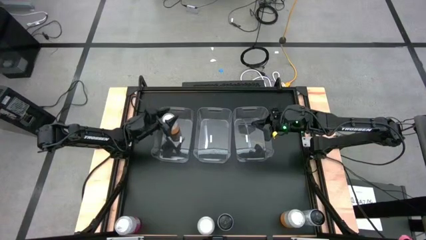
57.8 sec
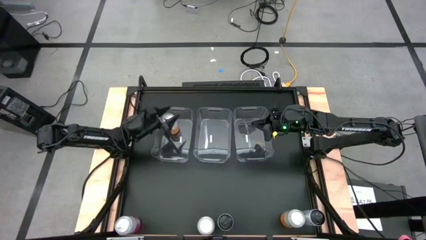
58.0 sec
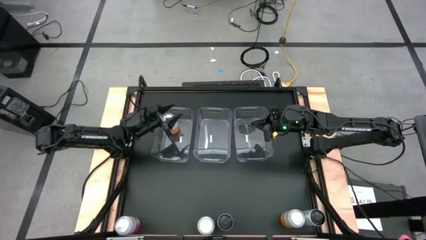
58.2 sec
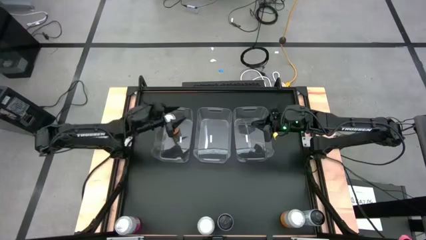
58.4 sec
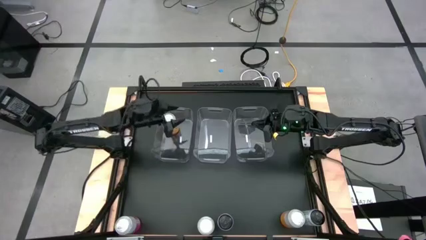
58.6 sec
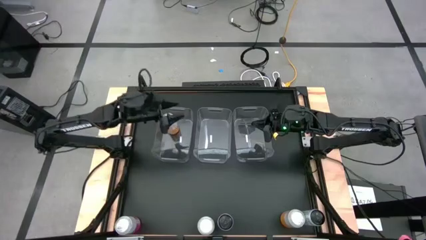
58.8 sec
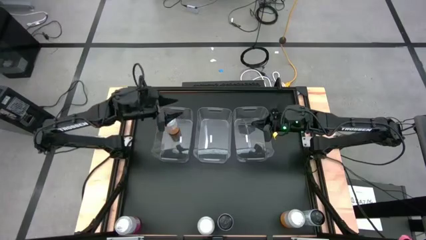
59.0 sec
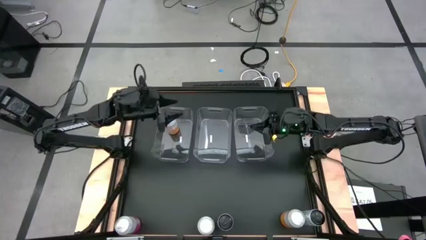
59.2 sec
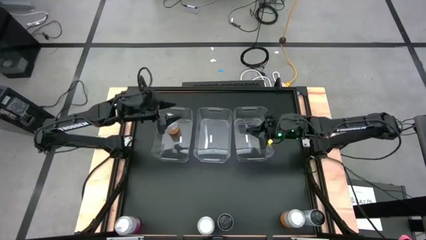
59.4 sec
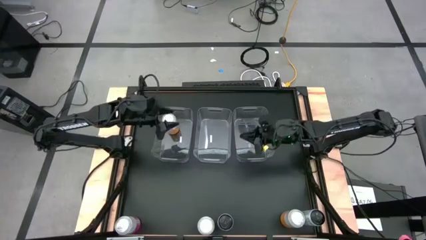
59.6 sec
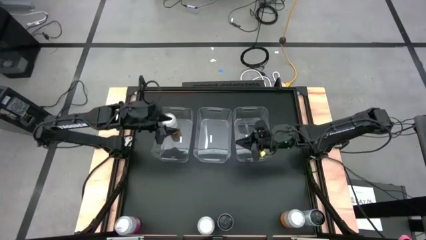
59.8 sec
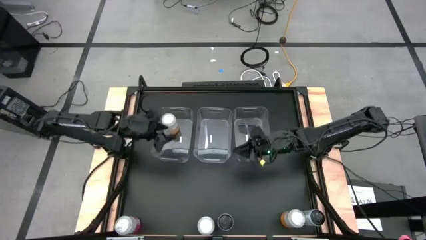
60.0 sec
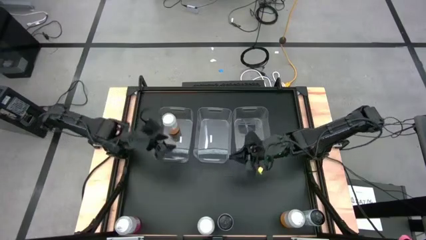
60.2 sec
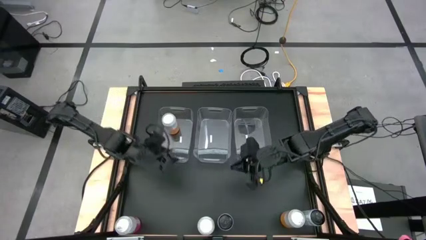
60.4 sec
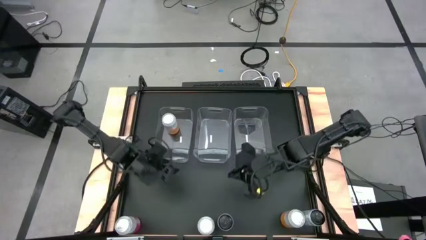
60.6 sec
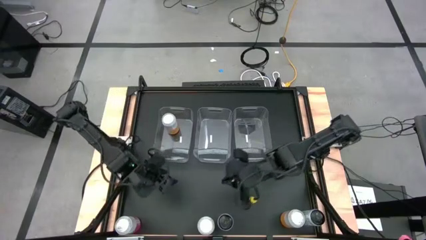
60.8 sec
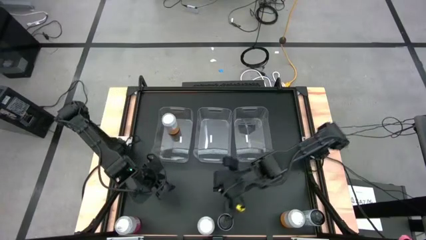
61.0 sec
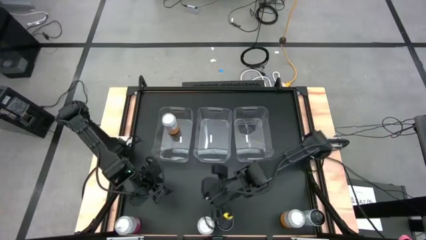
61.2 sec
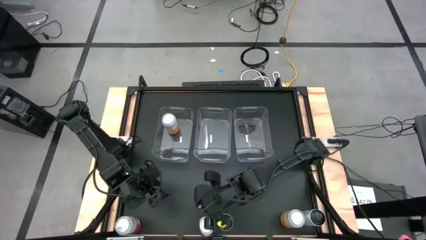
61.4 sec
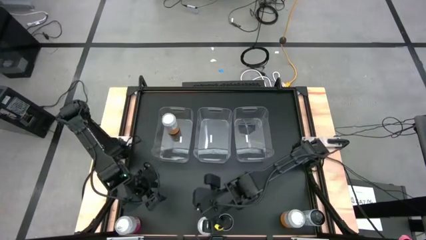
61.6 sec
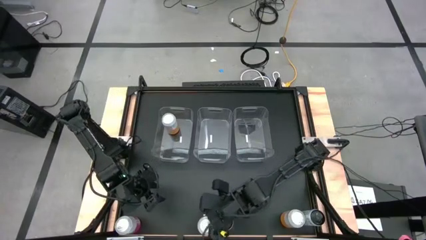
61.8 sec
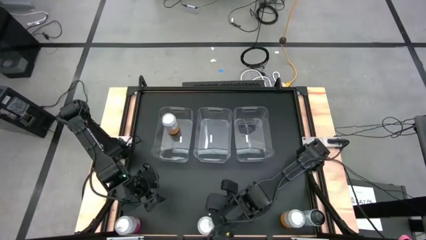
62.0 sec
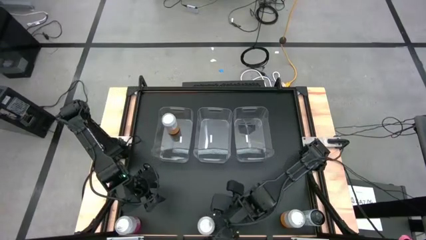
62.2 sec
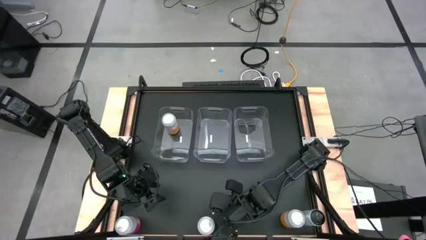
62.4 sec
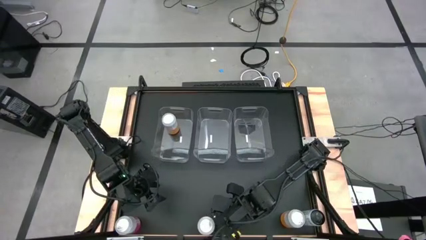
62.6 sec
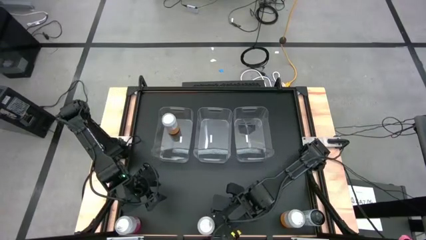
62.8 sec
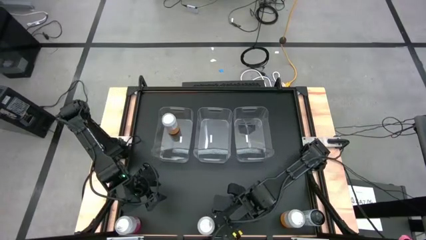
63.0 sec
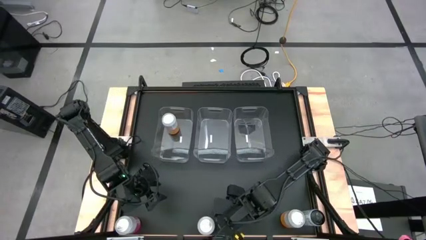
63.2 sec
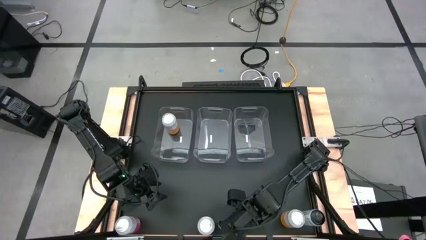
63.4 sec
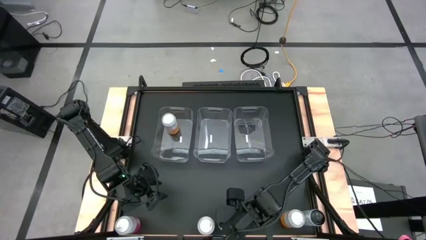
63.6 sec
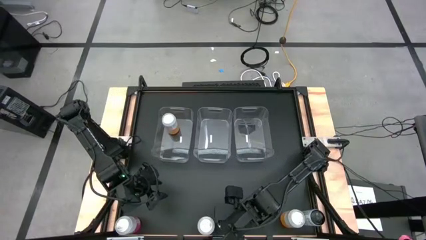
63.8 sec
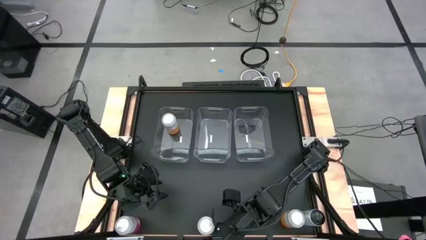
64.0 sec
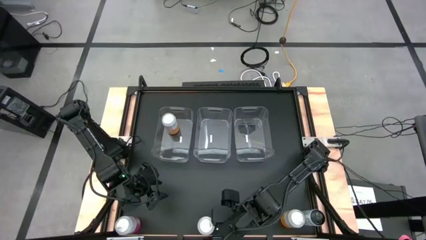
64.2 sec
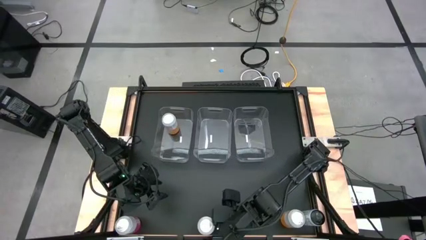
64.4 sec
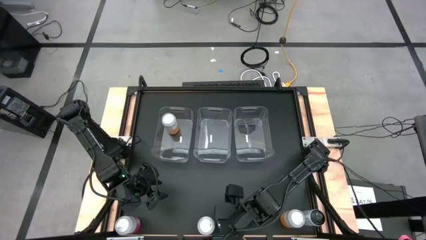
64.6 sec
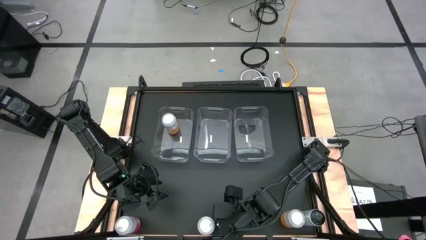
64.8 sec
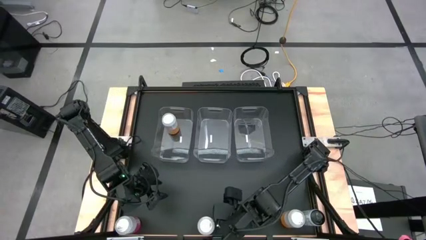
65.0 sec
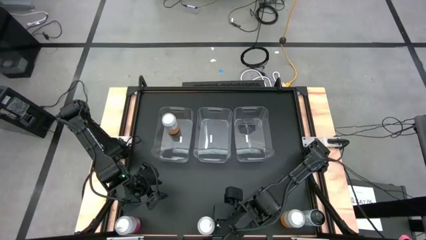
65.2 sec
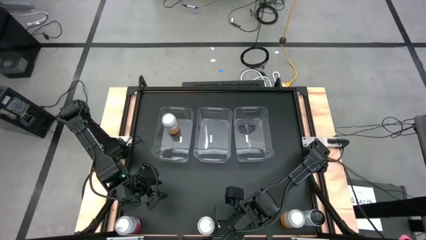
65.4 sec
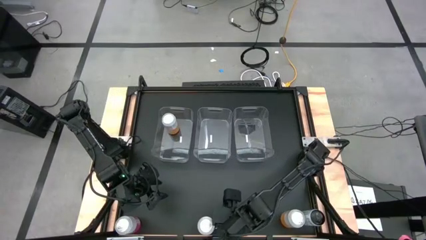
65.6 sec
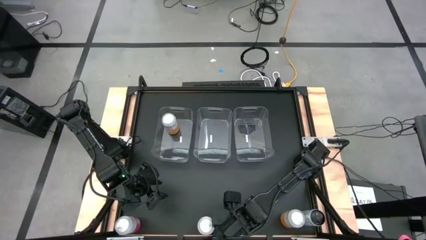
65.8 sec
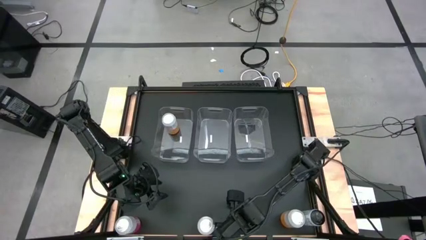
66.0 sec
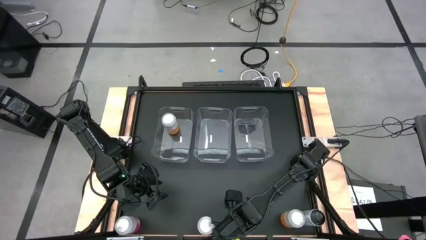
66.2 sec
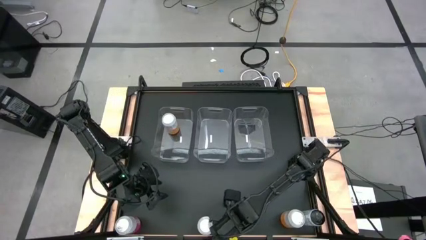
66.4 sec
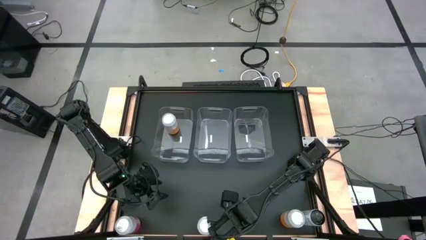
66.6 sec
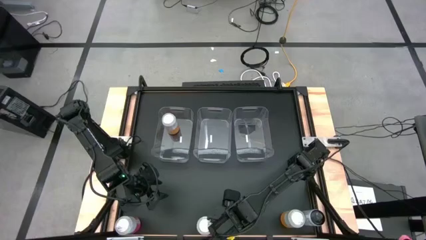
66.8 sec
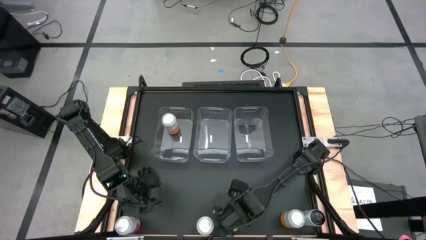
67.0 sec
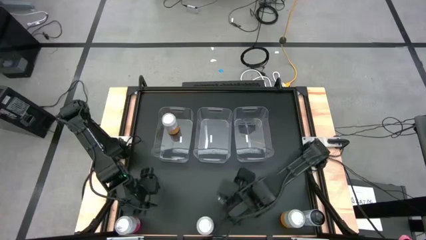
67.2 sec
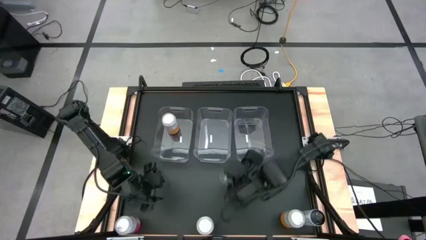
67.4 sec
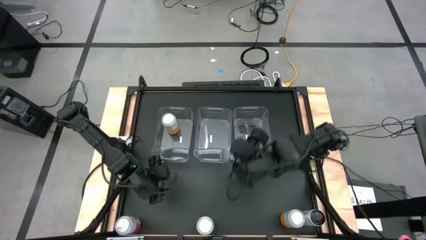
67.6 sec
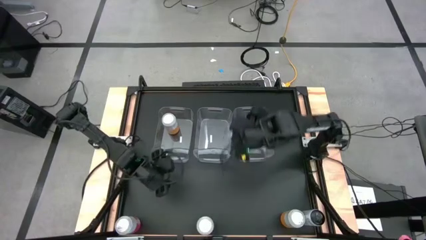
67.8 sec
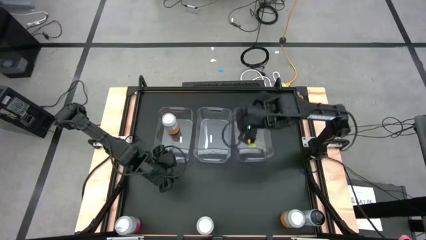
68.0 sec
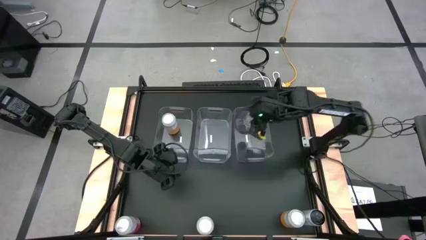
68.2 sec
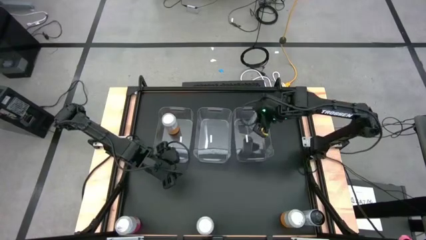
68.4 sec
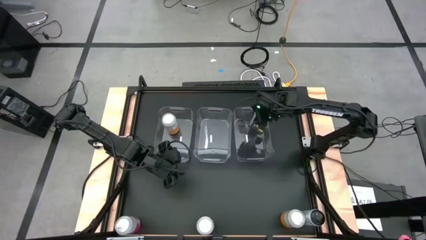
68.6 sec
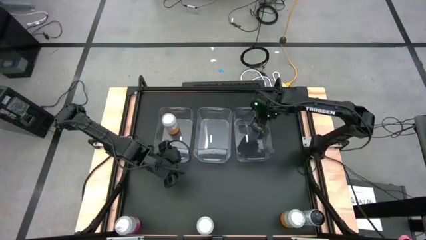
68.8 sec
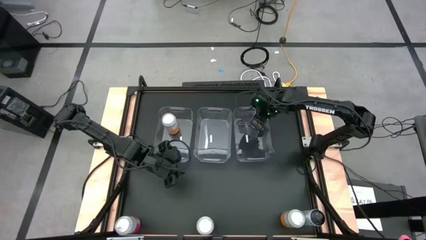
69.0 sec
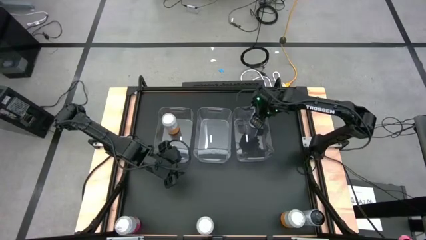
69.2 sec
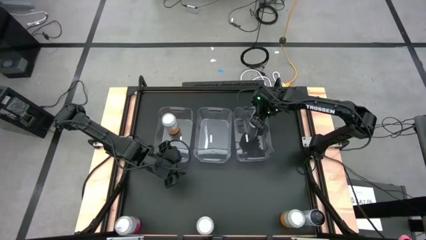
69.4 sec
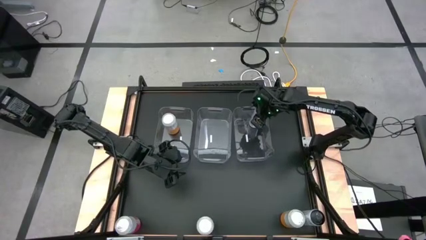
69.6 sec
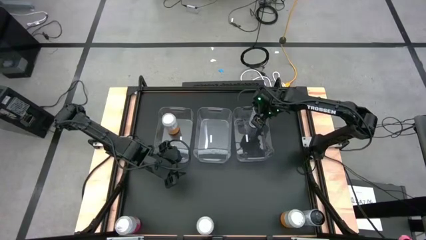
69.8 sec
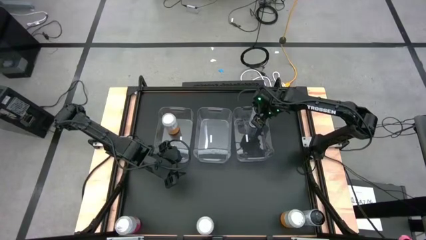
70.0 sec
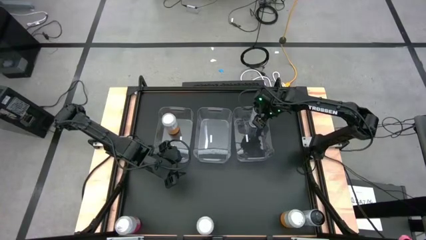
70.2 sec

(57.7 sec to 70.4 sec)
Task: Sort soda cans
Put the left white-blue soda can into the right transparent bin

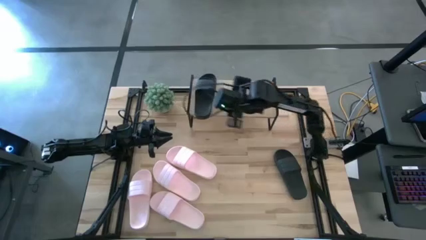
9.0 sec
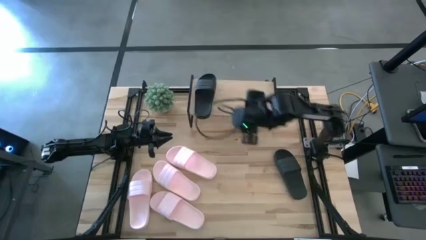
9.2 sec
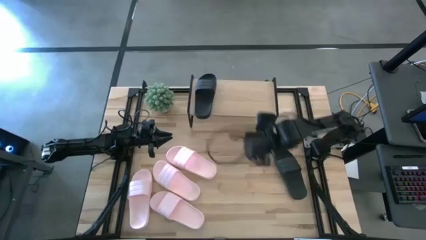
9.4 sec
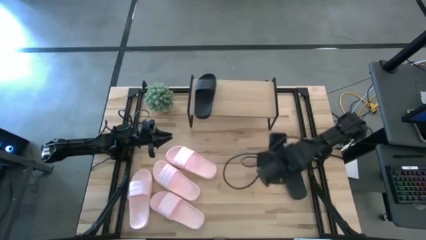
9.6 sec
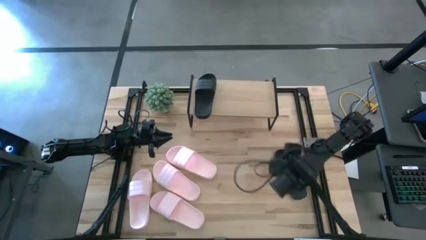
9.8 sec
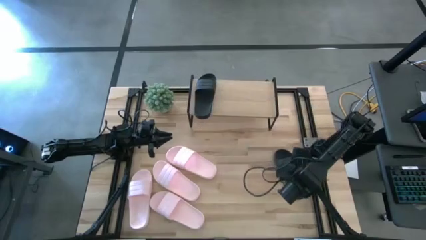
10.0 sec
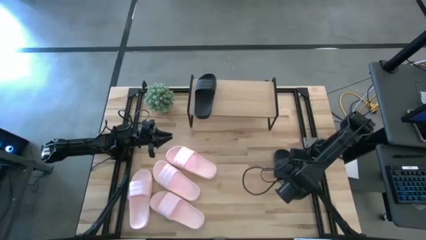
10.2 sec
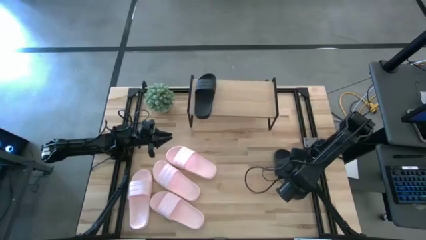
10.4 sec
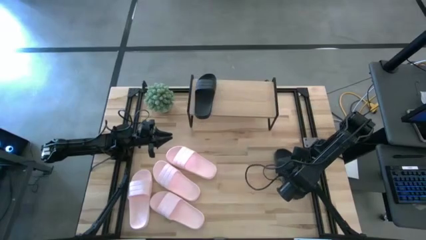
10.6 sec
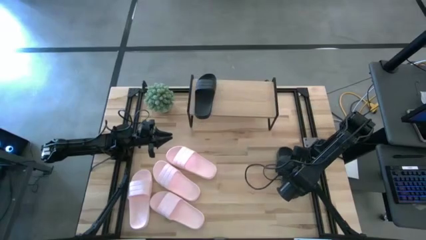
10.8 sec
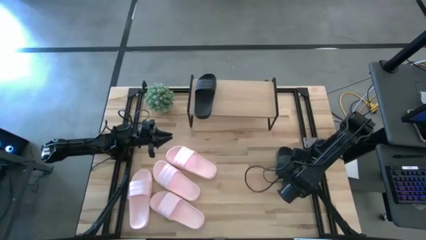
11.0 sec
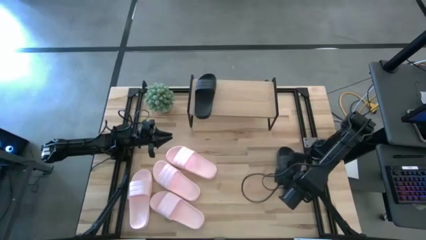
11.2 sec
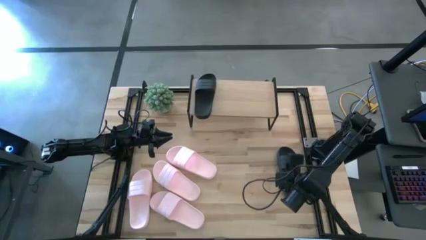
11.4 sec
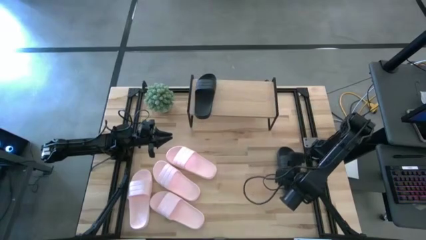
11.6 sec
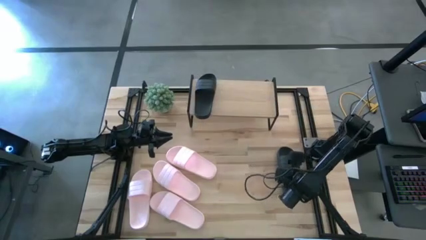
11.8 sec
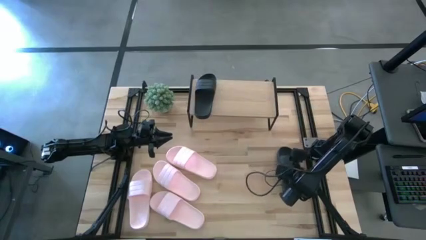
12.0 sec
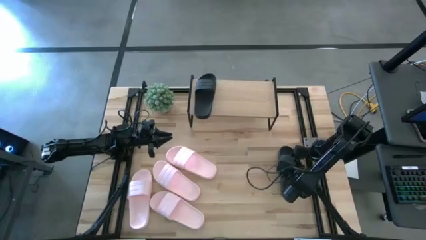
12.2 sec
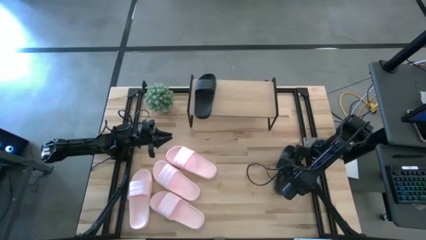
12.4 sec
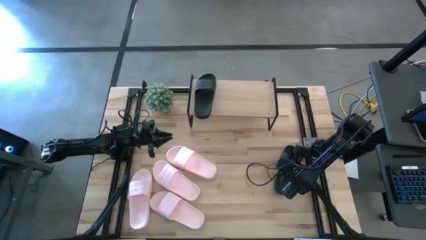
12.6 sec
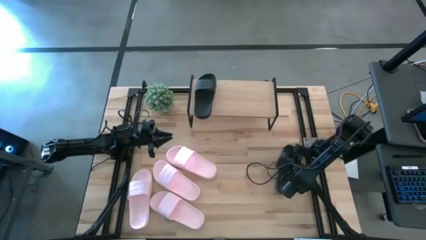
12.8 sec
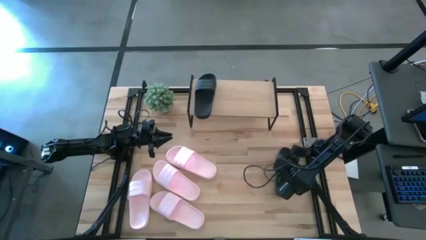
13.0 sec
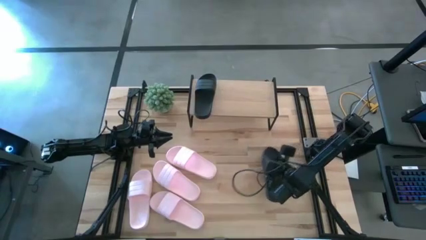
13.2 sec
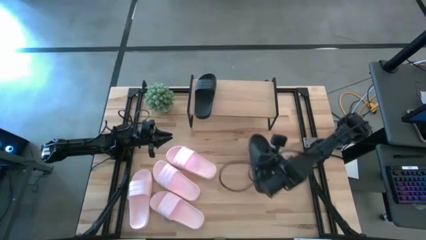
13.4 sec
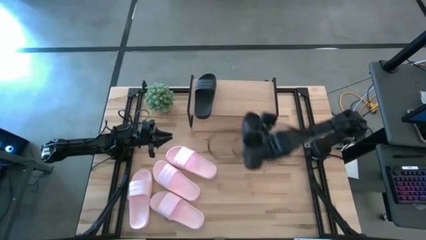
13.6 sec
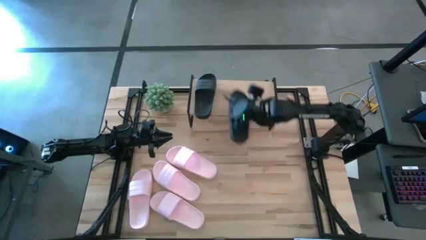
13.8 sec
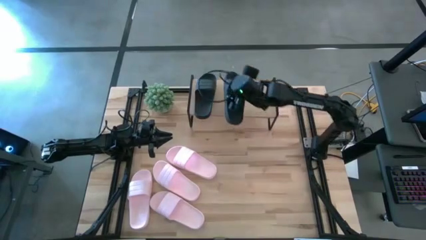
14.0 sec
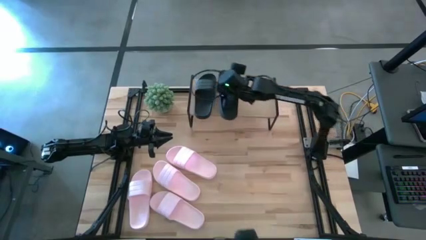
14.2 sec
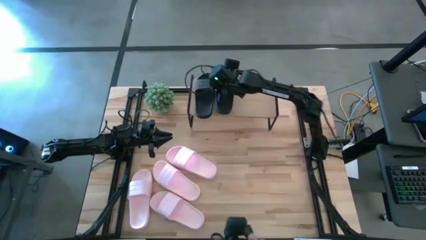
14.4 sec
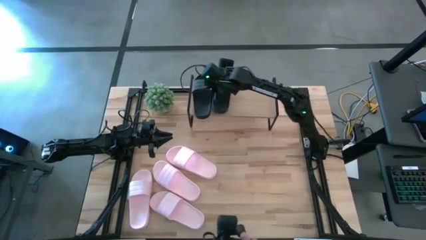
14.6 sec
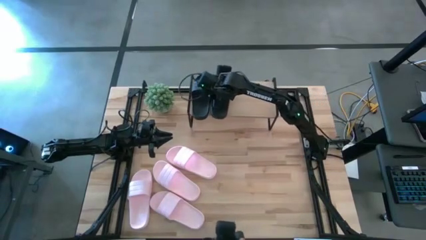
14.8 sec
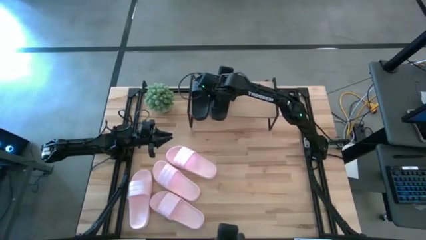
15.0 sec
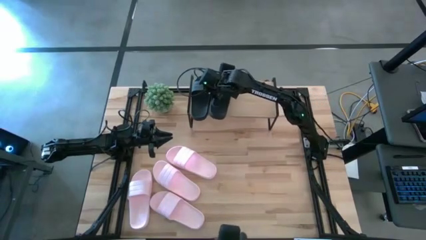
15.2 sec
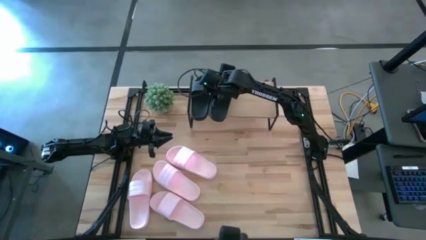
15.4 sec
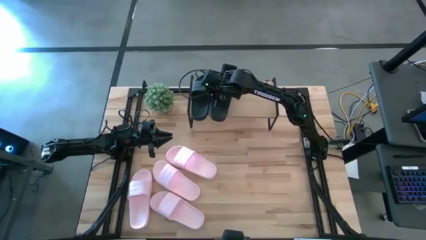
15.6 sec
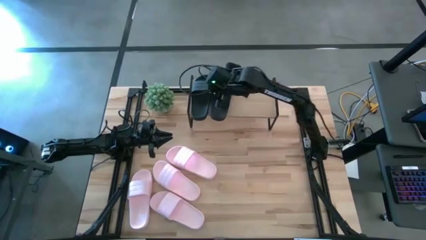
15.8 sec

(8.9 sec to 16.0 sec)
Task: Pick and place slides into the shelf
Put the black slipper on the shelf
